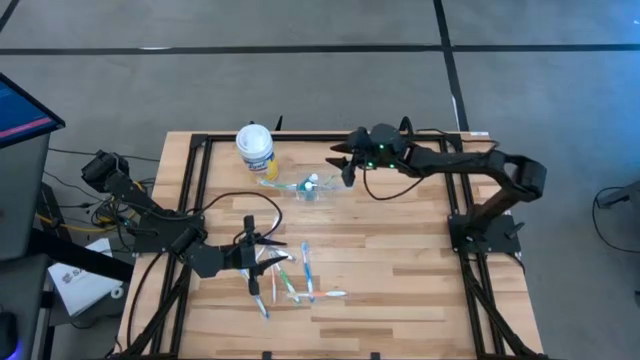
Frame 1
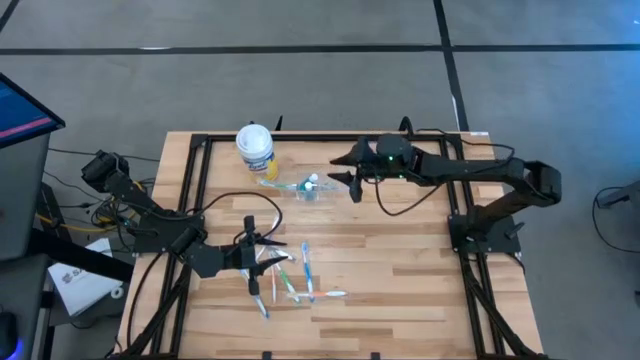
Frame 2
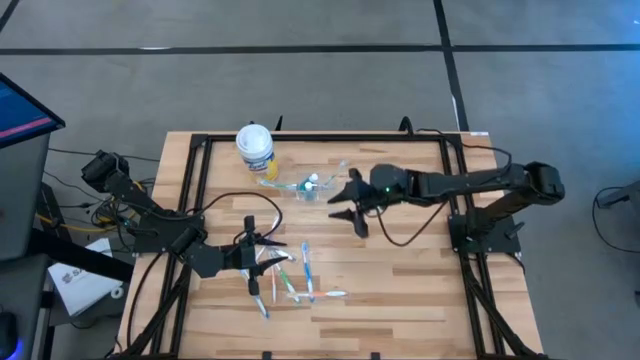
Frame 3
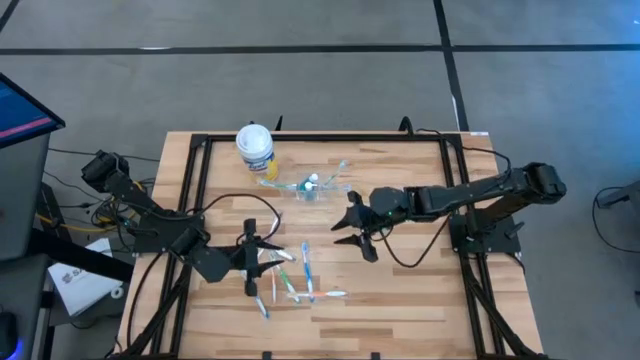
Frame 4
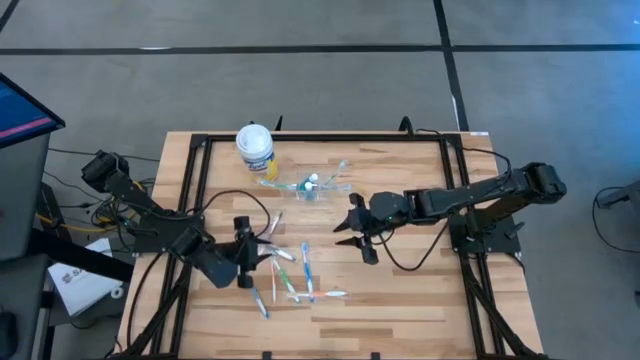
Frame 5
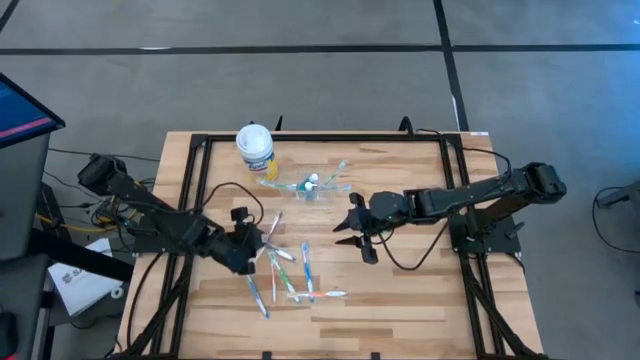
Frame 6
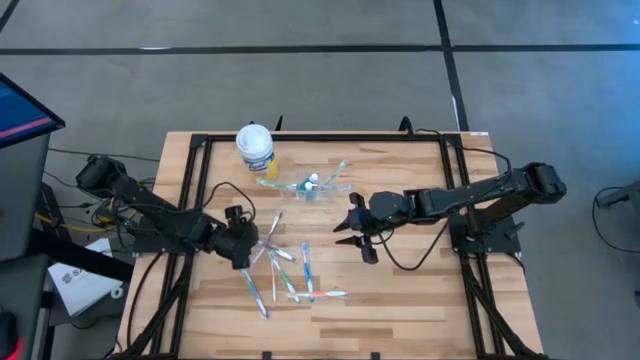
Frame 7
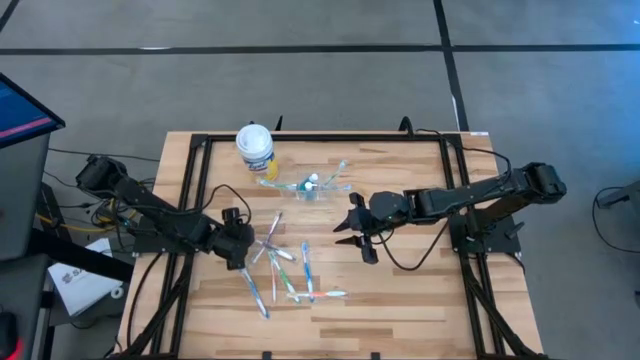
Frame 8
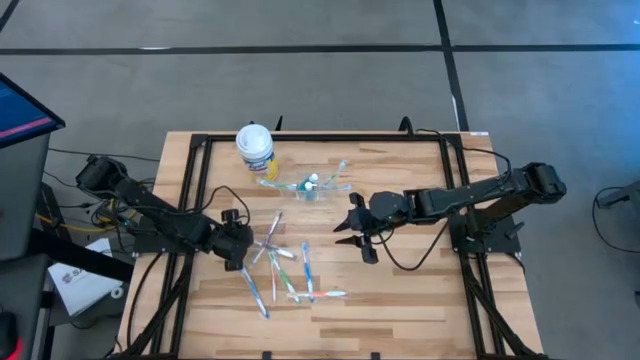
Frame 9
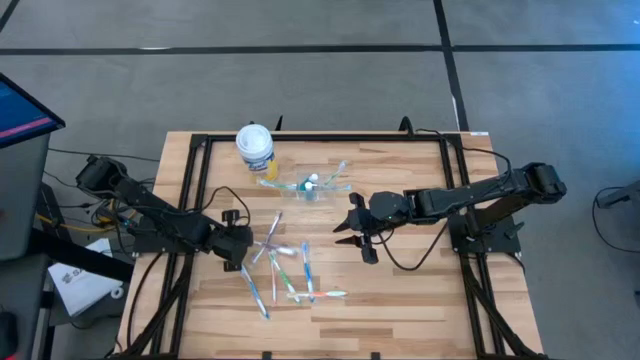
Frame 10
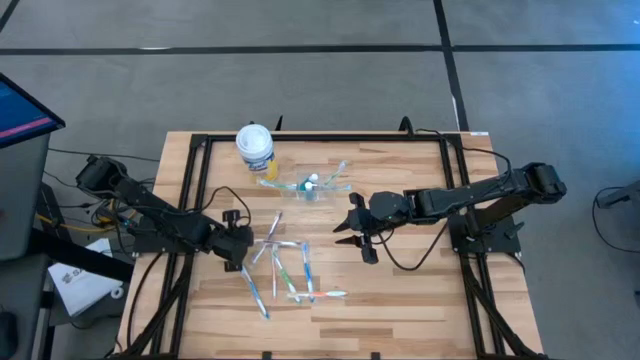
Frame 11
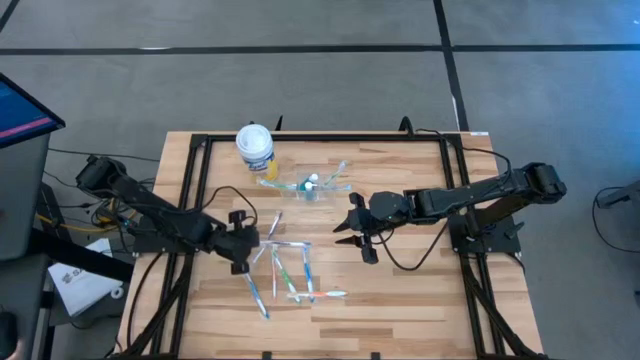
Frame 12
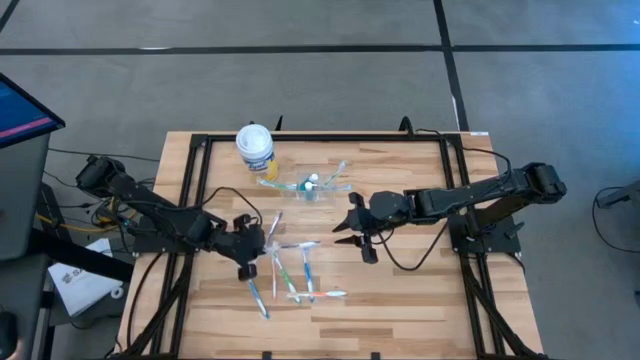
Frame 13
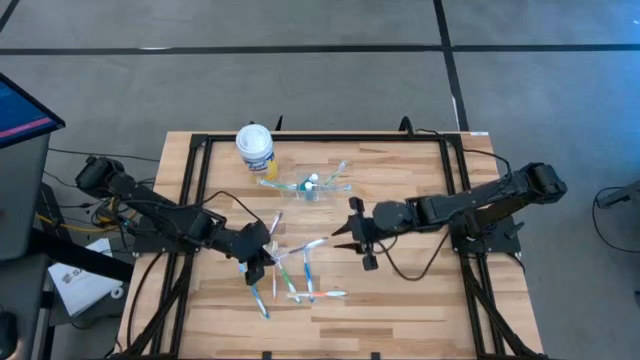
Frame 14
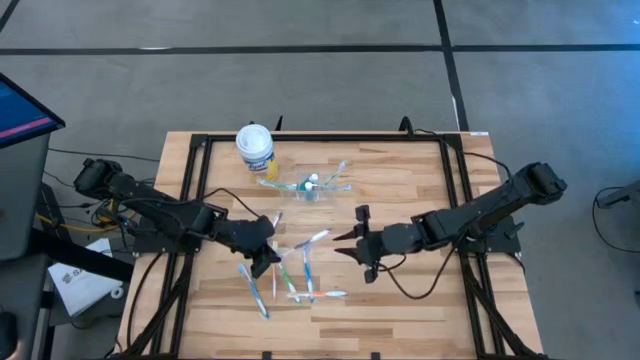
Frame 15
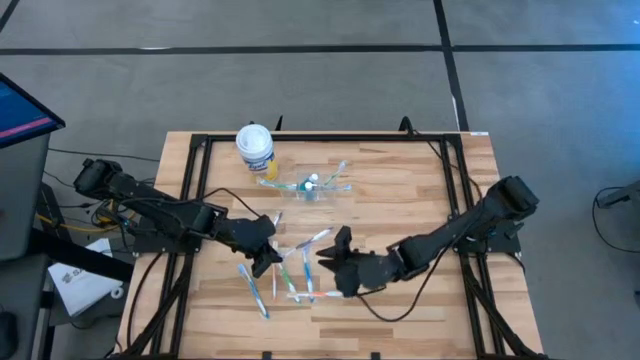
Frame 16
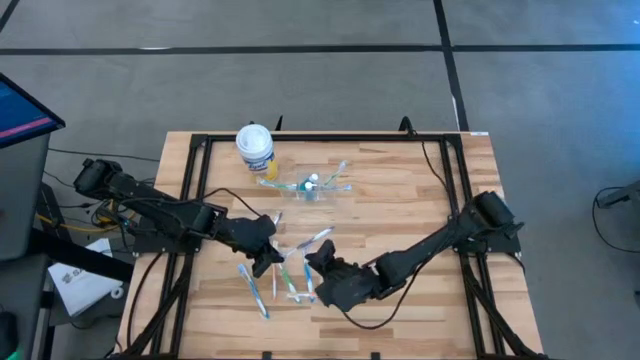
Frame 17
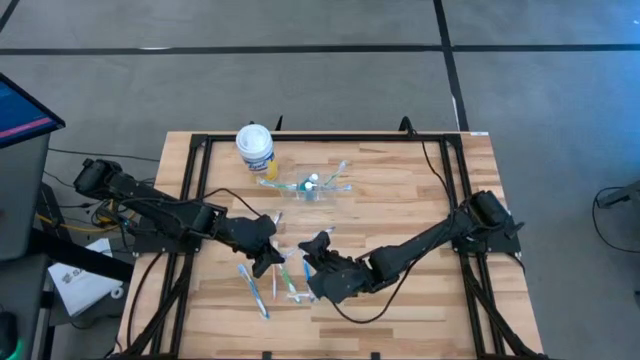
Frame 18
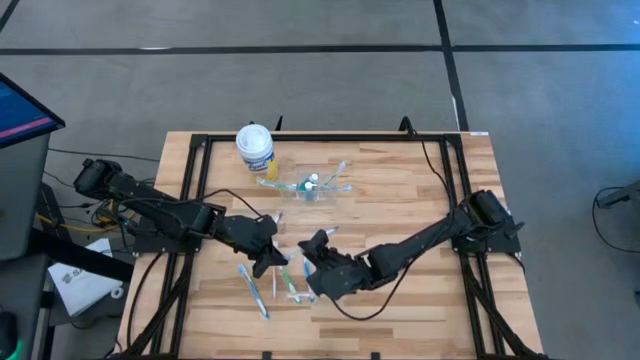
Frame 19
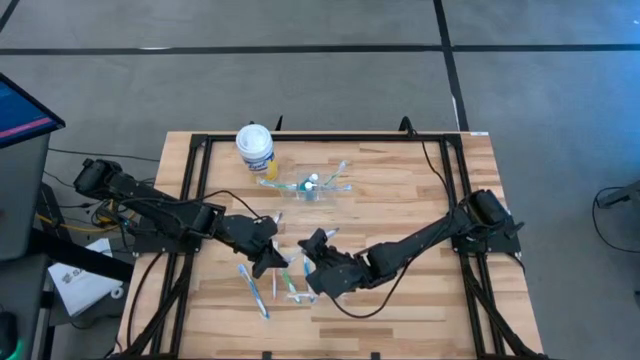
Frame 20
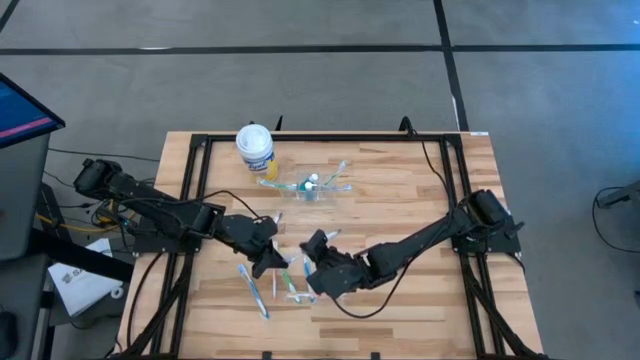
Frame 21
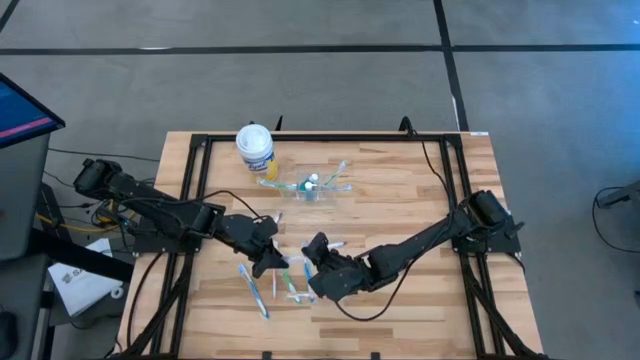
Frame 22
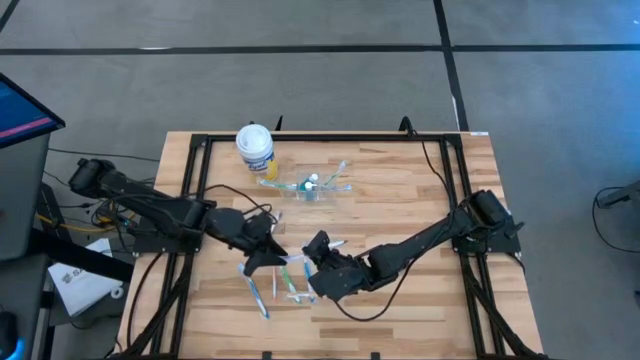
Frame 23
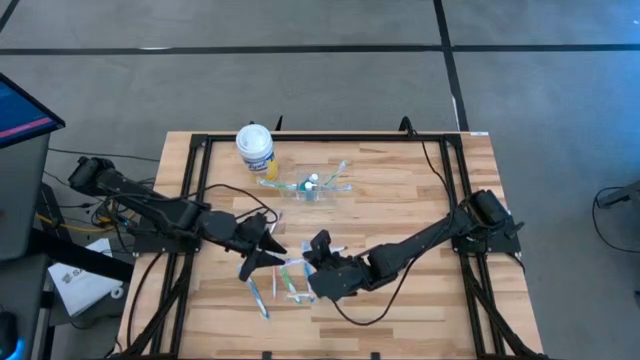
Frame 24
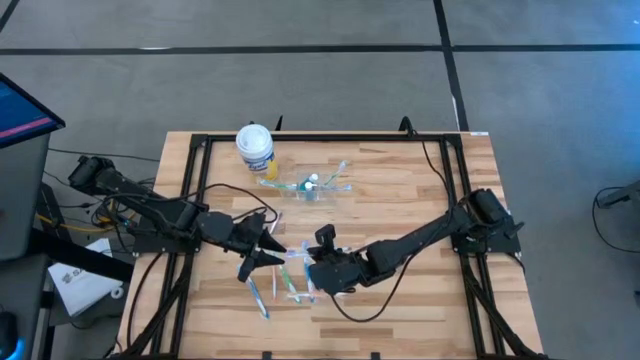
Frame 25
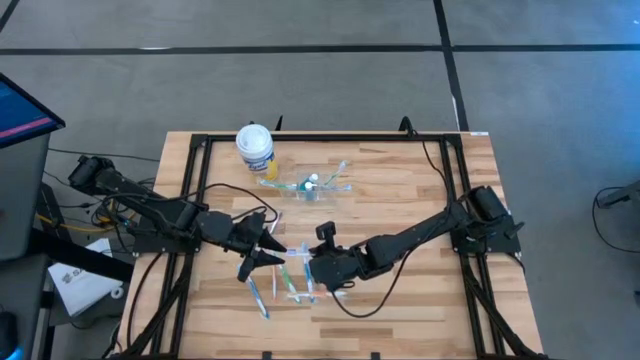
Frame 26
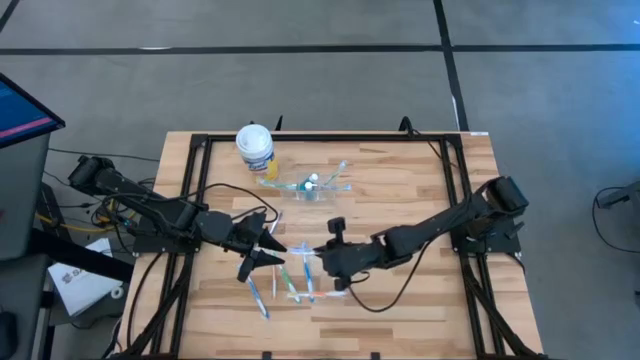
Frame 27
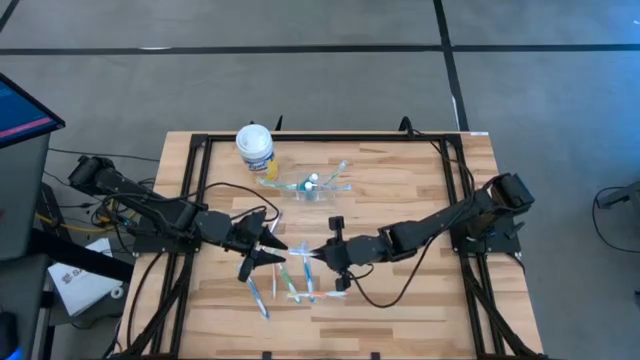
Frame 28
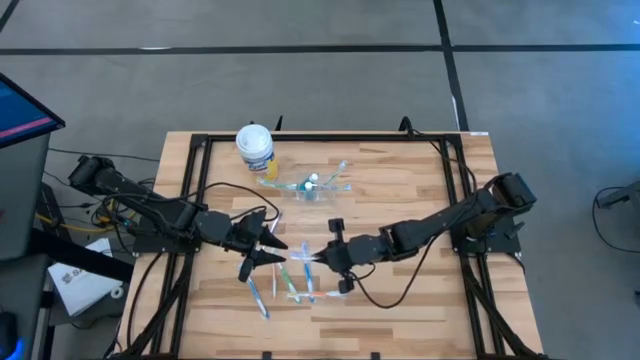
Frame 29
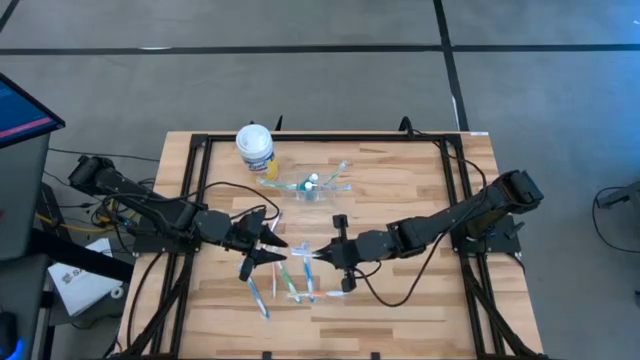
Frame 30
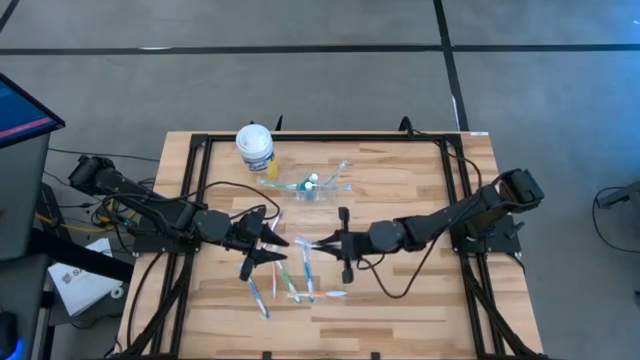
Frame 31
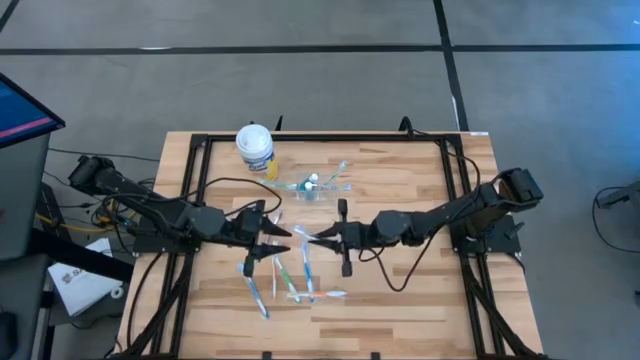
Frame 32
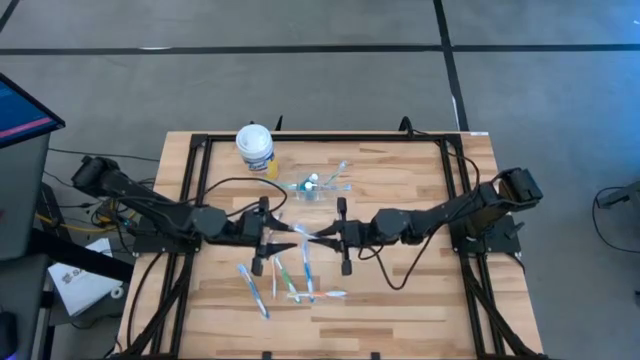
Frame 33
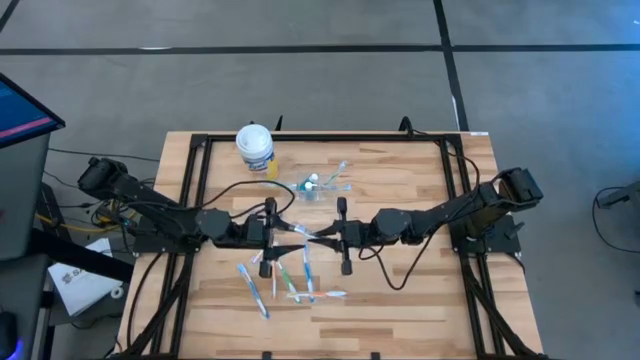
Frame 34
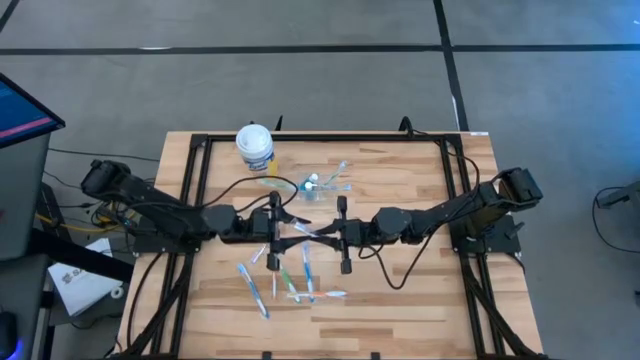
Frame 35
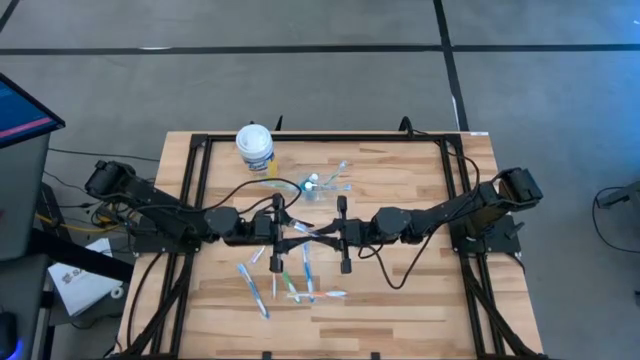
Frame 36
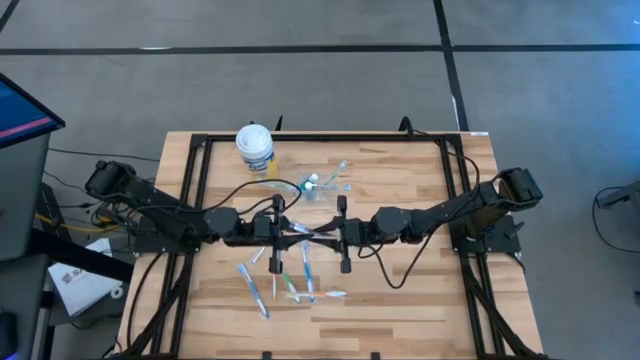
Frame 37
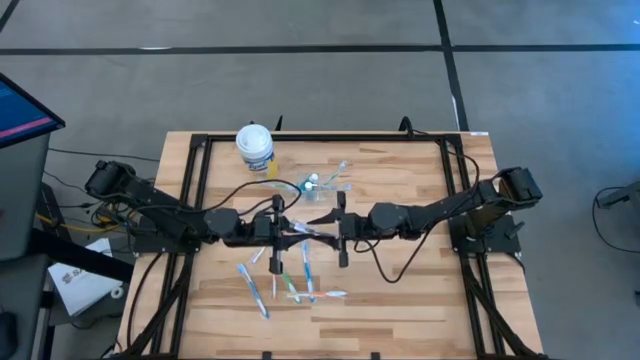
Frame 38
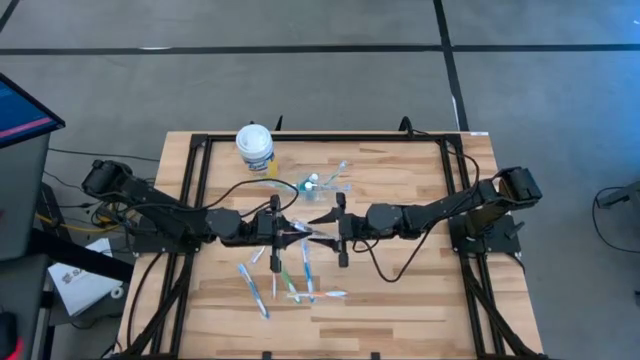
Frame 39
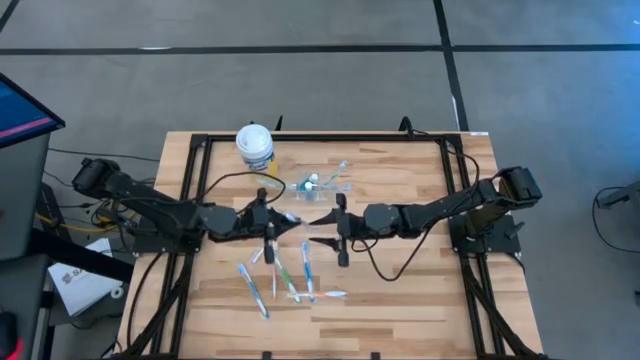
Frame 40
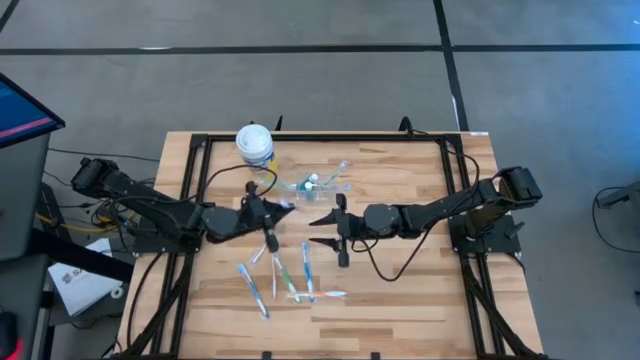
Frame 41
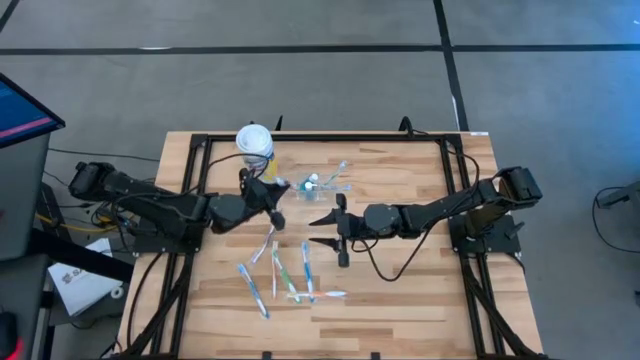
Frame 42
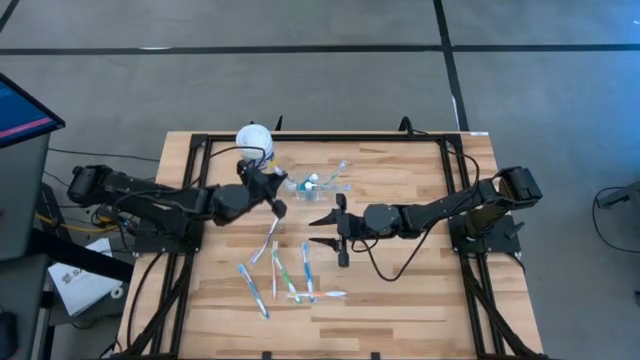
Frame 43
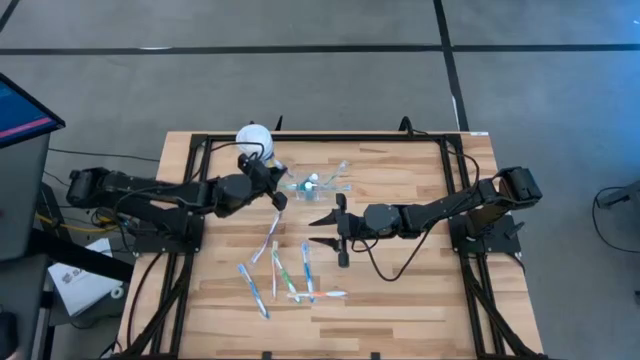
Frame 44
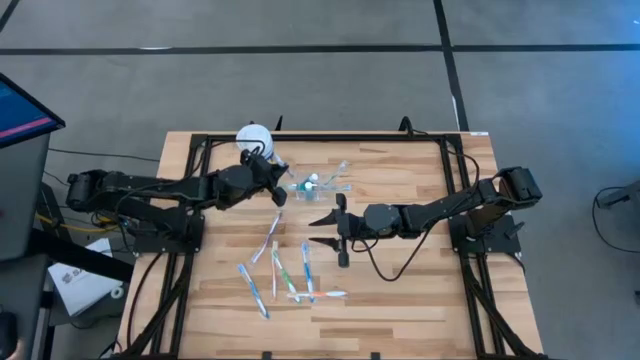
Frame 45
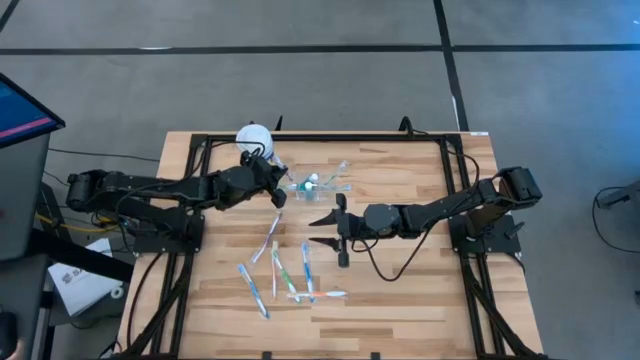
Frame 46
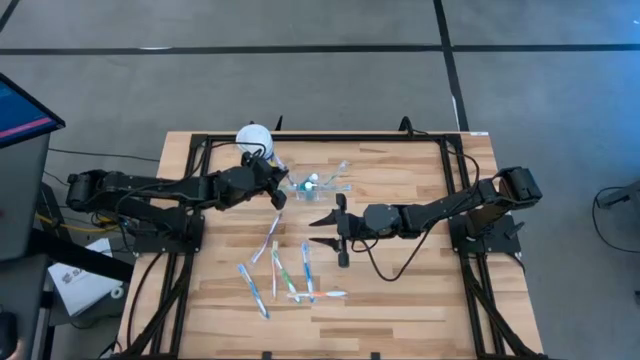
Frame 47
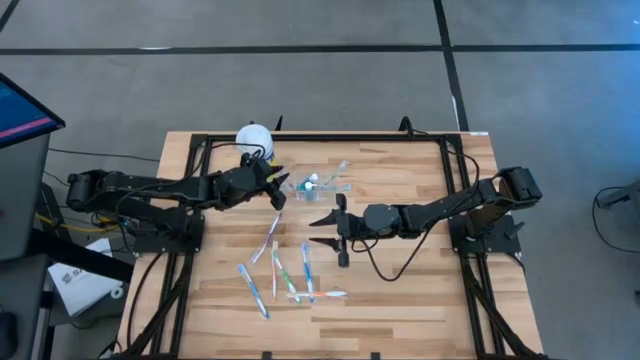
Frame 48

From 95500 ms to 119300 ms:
Task: Pick & Place toothbrushing station
Put the purple toothbrush into the transparent organizer
